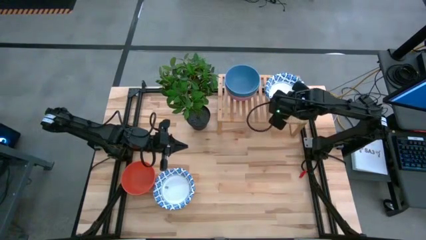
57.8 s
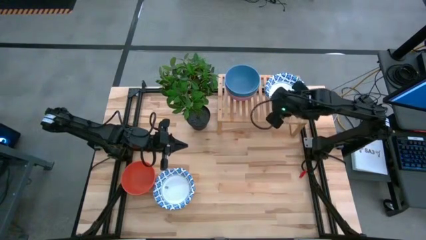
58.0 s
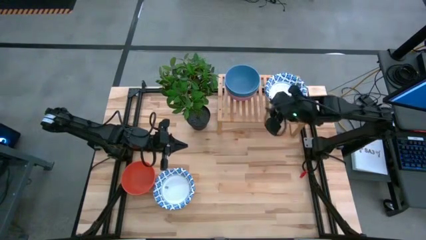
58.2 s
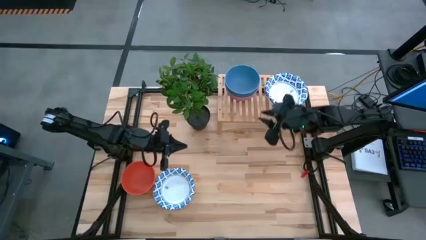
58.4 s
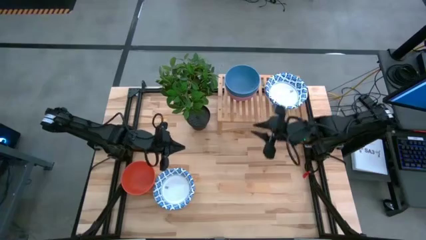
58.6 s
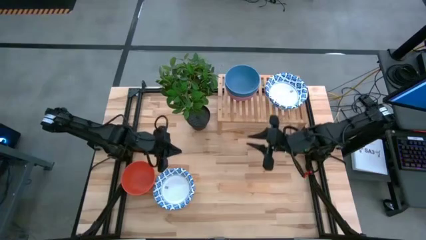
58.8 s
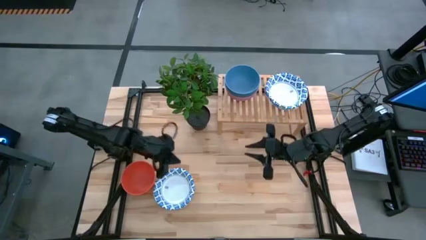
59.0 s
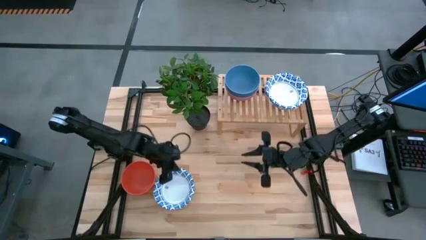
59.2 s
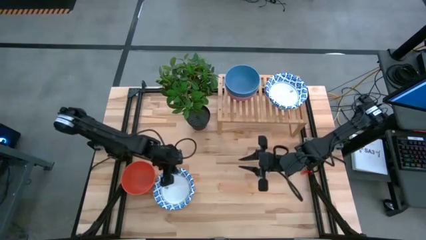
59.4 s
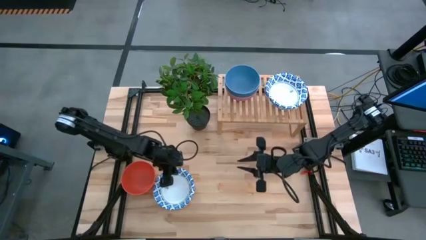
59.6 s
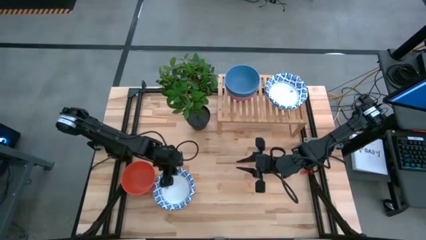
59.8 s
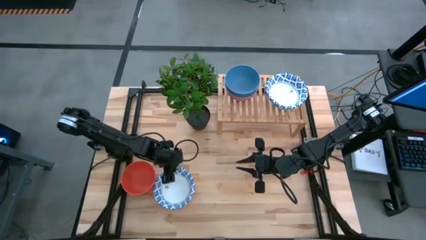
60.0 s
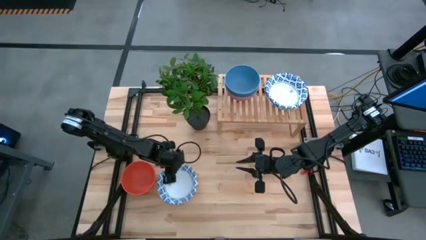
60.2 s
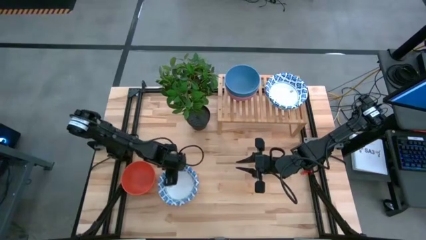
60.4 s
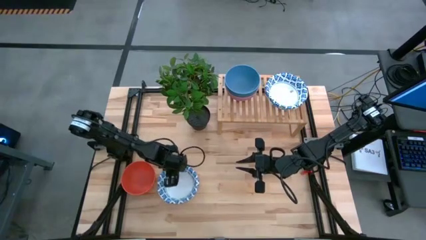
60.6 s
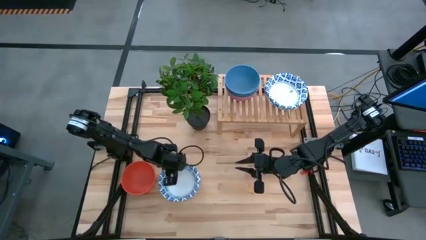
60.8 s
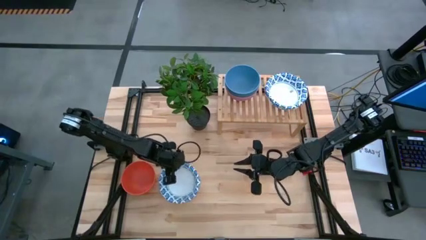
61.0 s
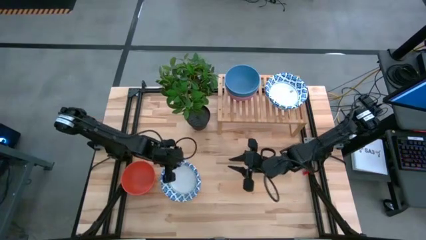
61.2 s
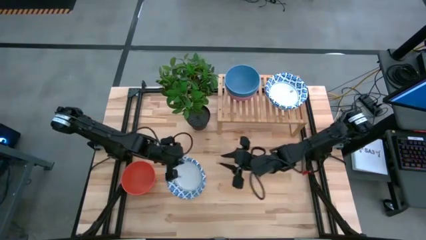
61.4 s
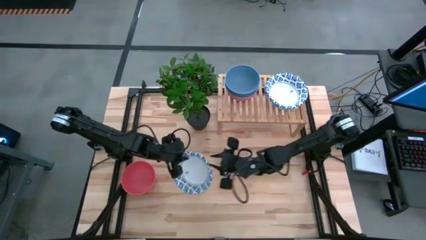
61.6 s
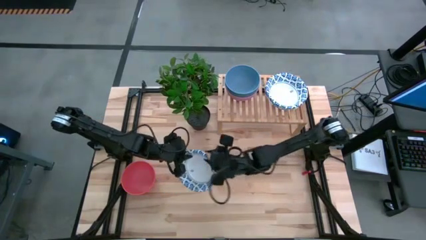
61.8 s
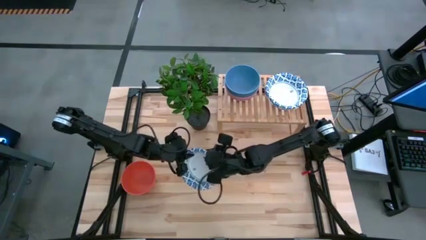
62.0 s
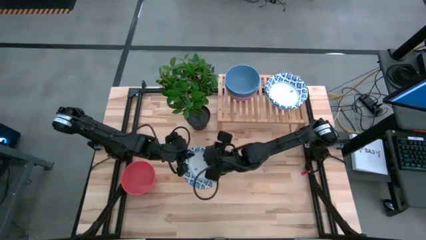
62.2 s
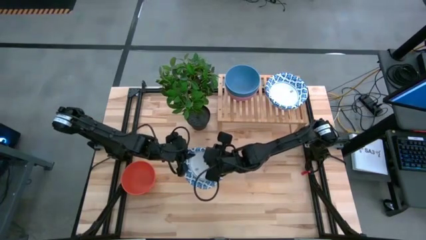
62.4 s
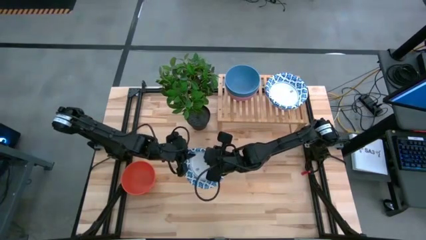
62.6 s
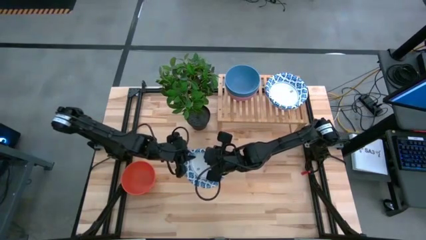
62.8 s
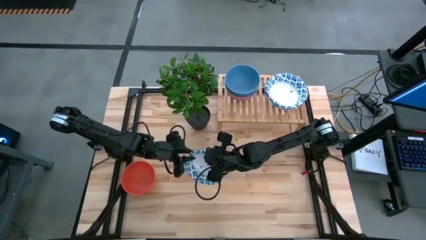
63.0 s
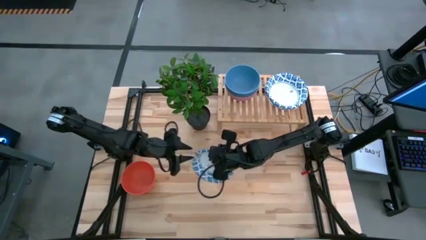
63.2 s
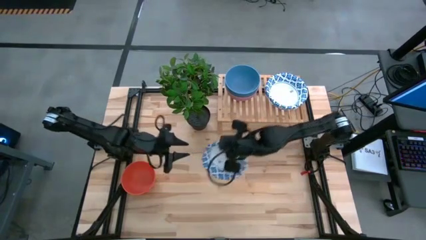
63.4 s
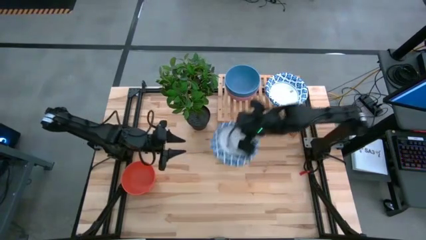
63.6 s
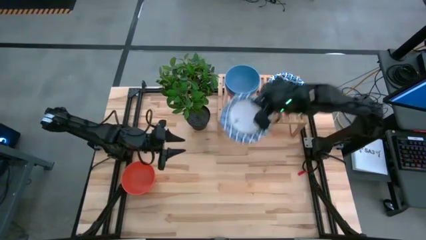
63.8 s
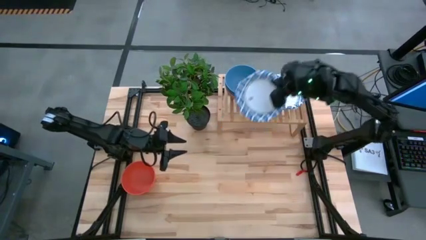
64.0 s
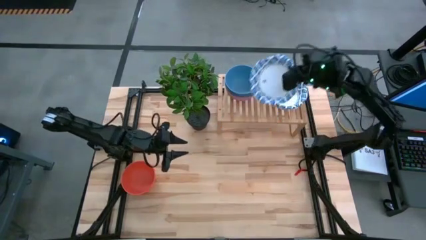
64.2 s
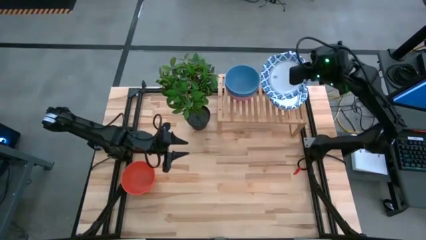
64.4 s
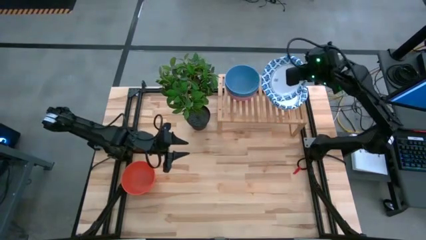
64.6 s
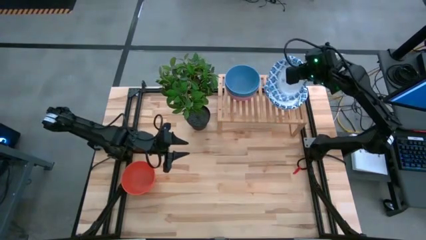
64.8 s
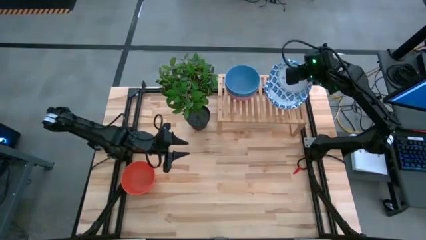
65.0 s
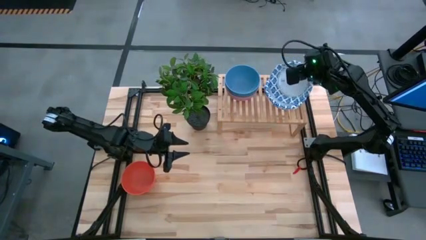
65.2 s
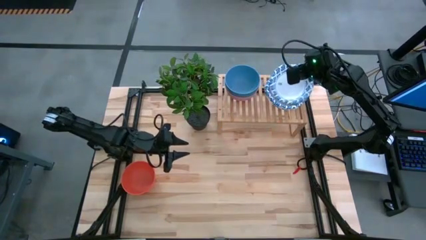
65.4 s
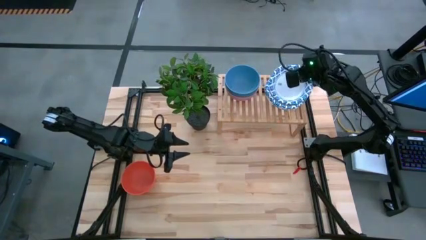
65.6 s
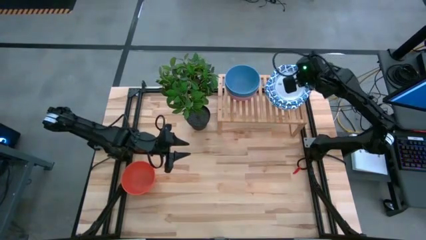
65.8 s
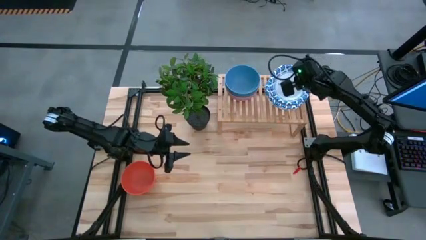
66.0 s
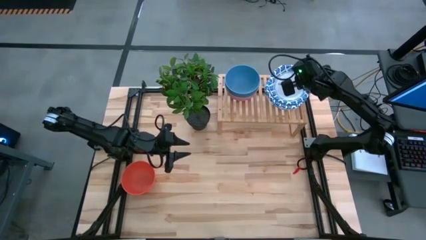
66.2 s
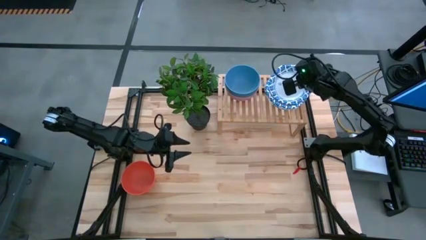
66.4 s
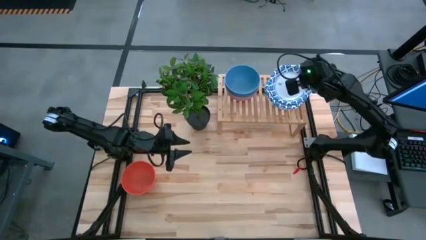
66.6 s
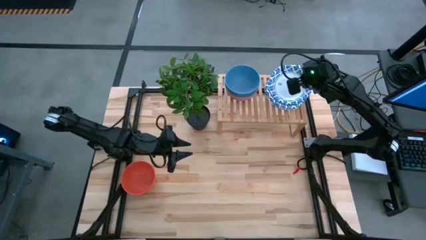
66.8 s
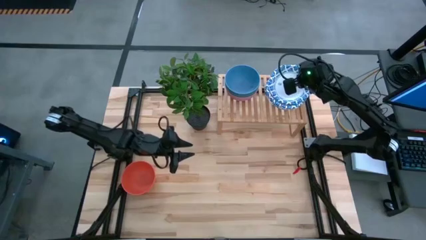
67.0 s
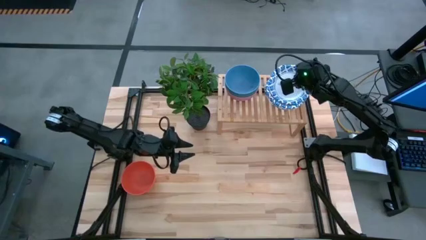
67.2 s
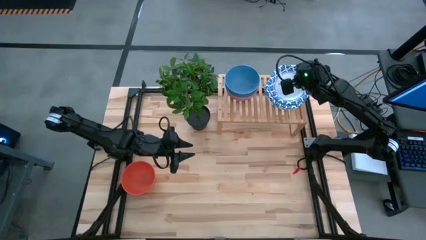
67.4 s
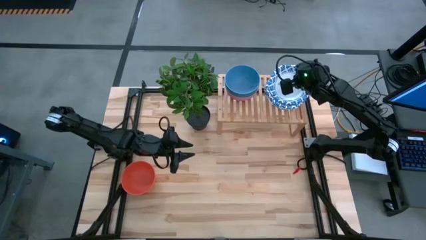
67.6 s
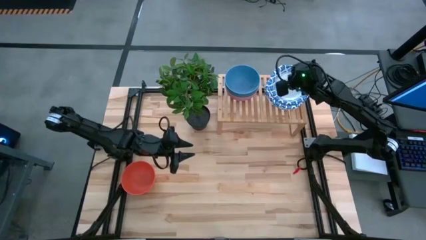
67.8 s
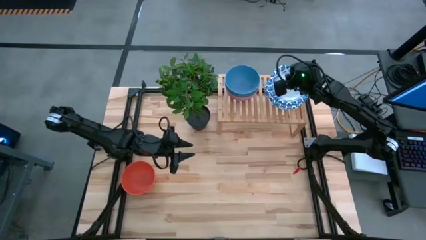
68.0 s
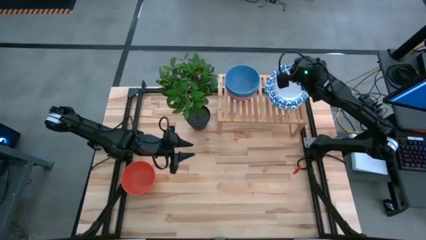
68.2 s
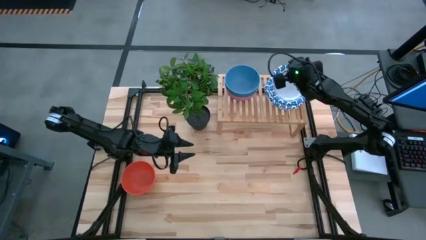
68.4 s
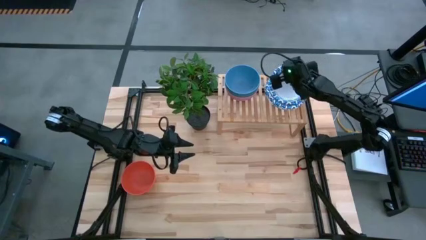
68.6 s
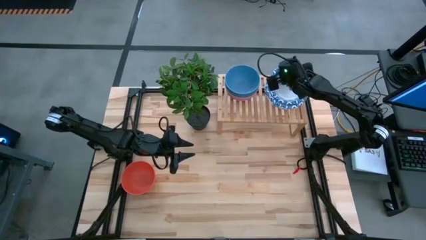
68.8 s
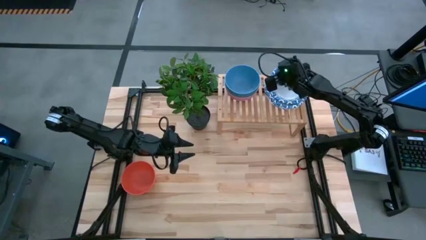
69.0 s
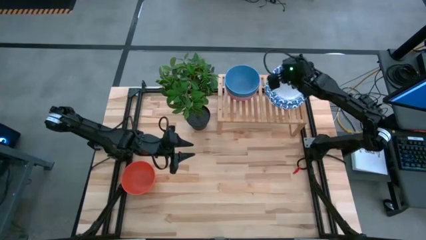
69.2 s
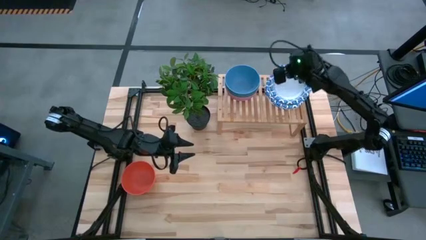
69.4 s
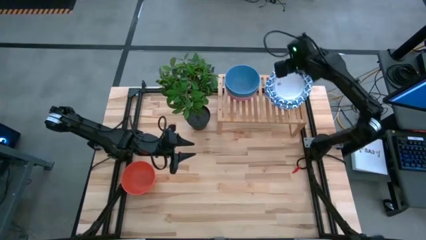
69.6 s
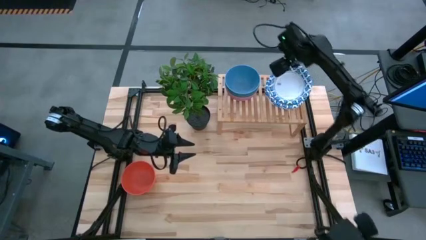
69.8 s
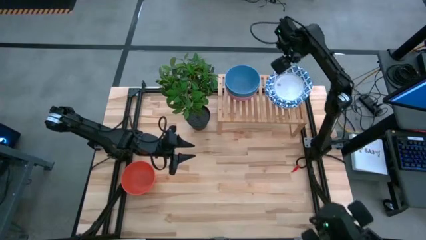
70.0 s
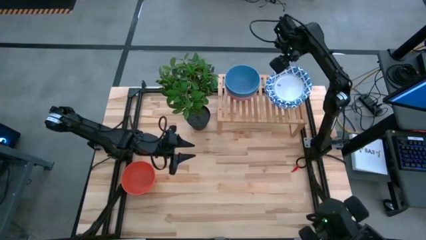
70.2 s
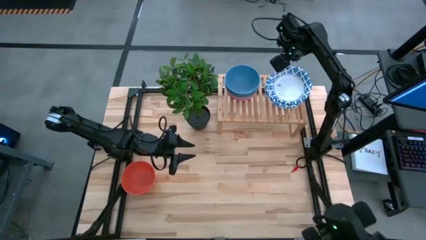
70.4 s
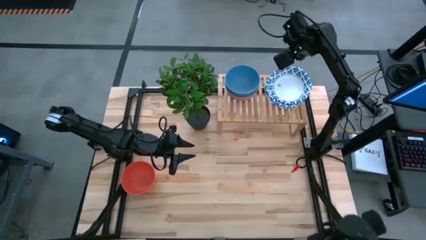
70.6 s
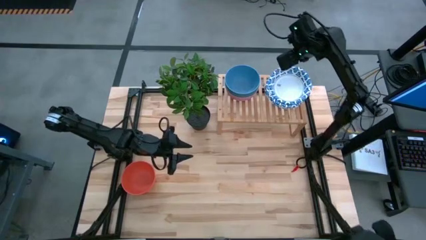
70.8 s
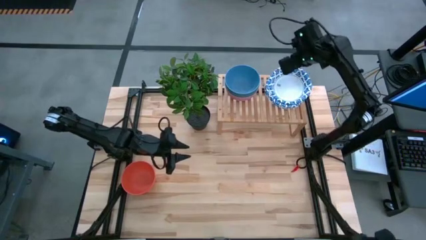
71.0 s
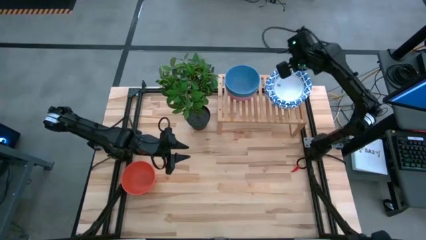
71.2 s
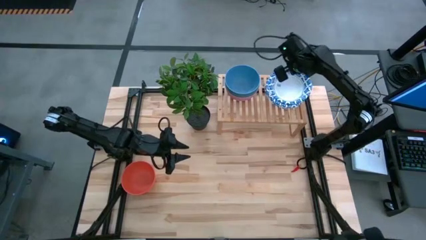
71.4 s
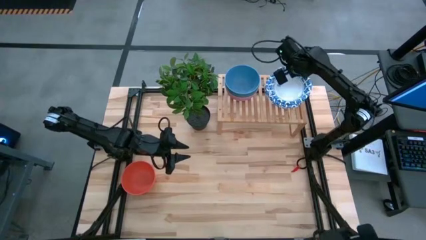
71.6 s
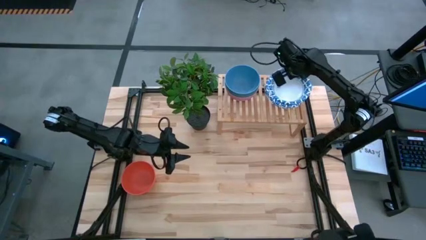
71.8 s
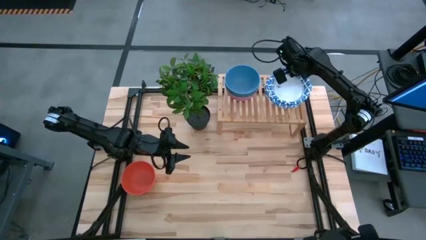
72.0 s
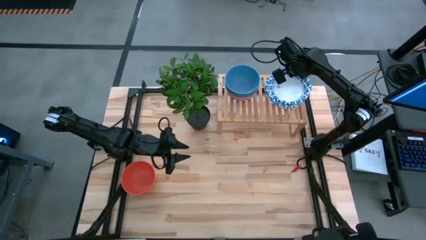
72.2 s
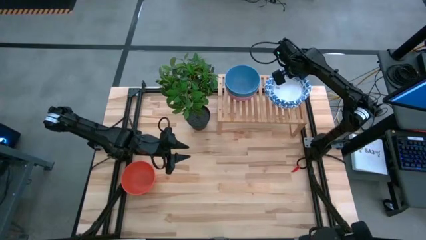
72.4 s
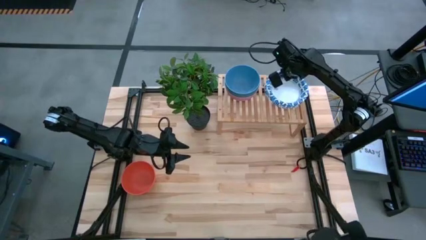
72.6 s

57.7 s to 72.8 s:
Task: Place and stack bowls onto a shelf
Stack the white patterned bowl on top of the other white patterned bowl on the shelf

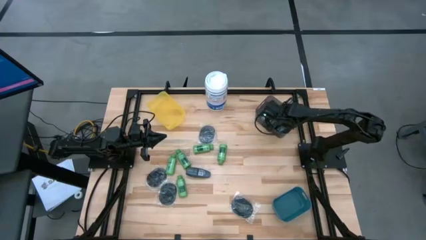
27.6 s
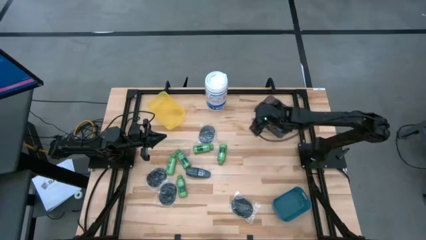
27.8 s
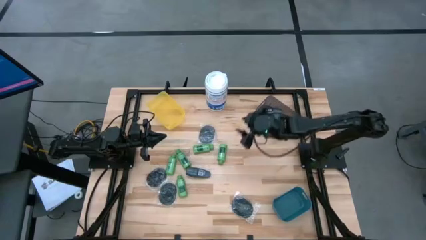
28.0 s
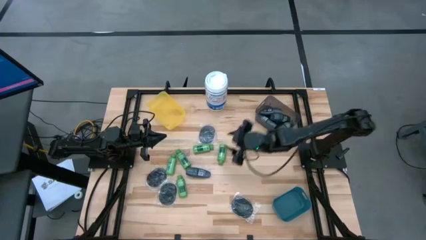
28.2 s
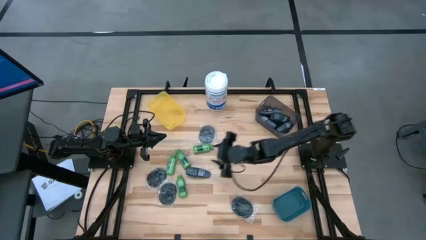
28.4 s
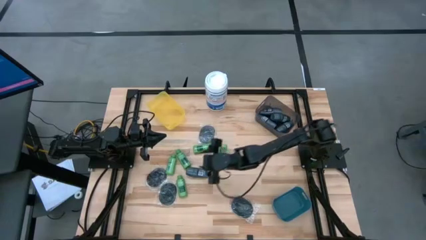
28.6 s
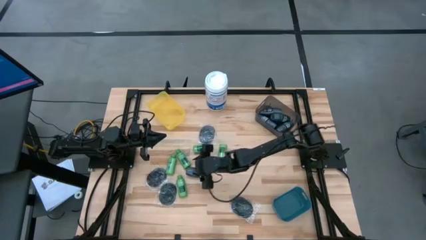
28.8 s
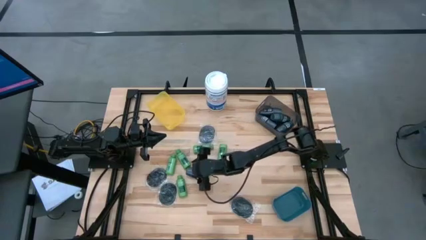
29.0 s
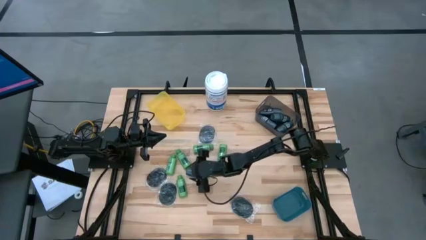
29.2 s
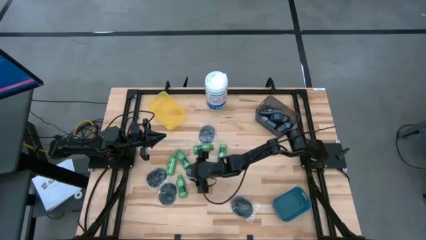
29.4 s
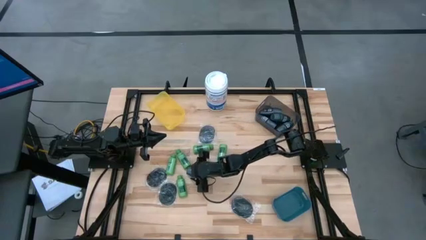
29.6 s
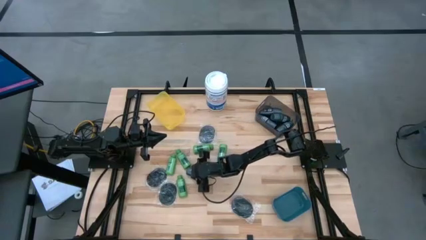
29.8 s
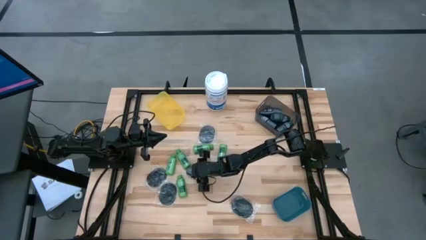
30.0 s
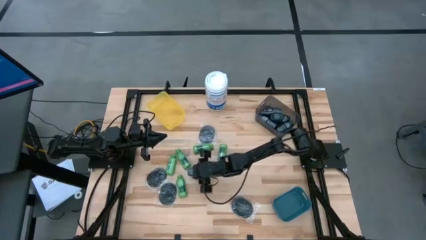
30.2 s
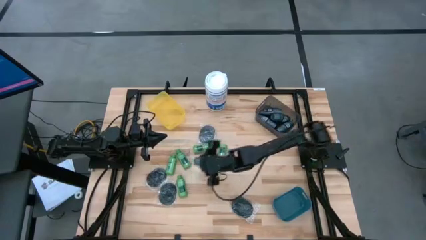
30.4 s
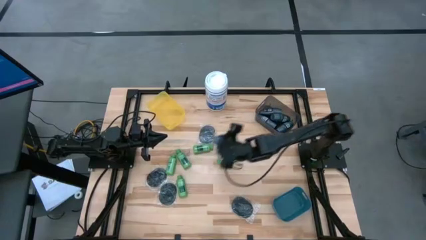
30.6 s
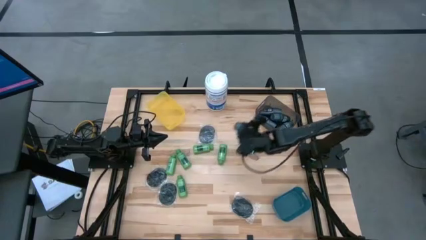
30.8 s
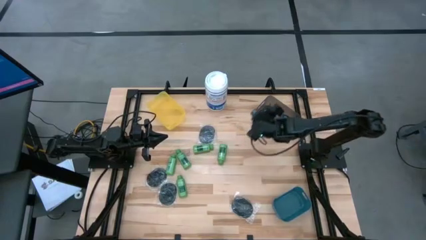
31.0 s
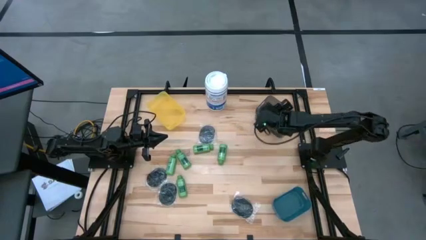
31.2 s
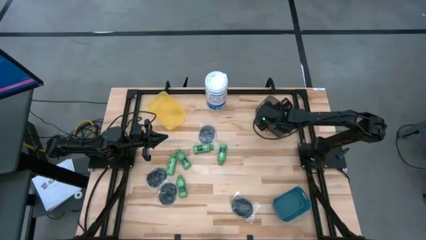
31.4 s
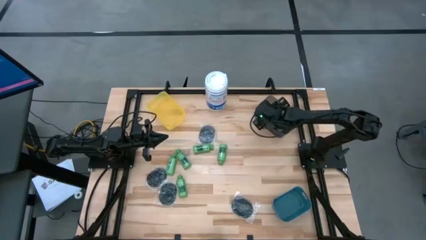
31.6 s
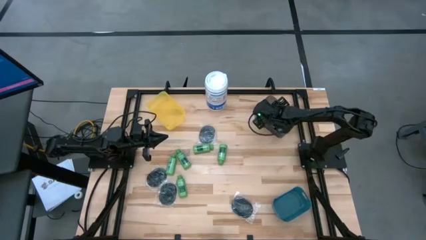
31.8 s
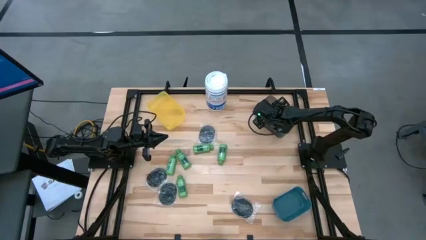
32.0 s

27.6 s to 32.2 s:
Task: Pick & Place Travel size toiletries
Put the gray deodorant into the black bin
